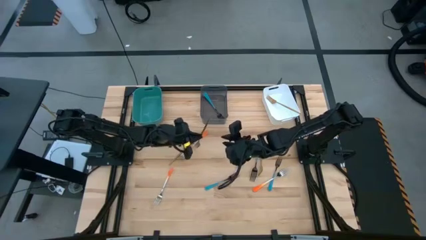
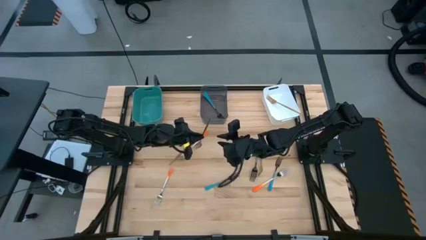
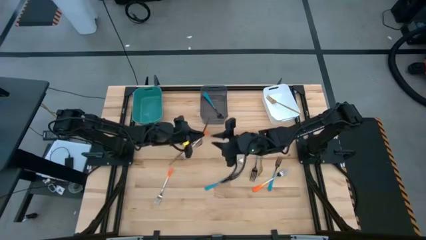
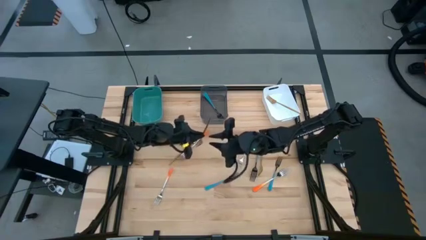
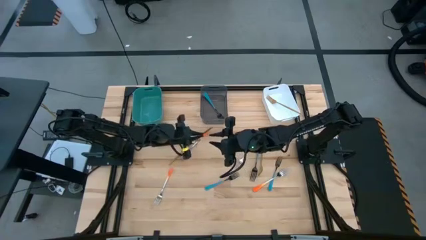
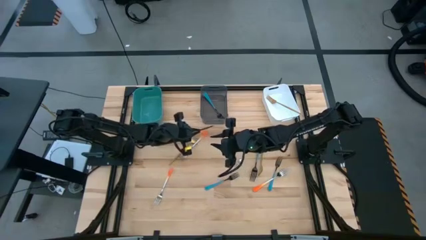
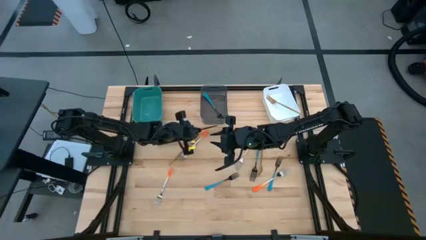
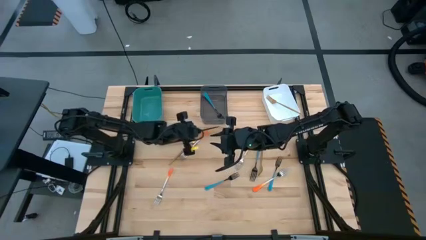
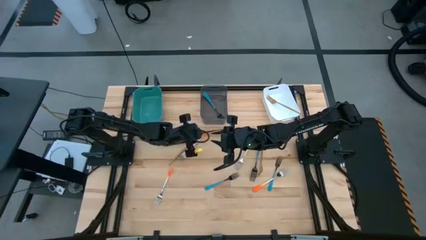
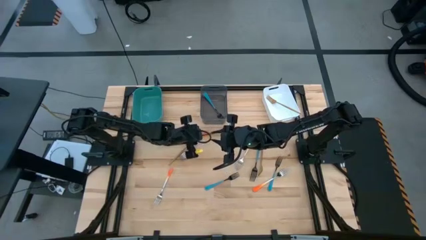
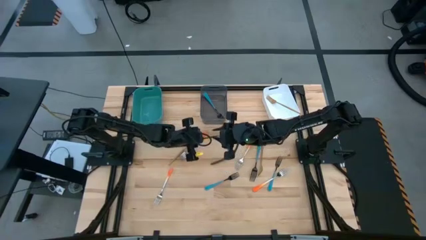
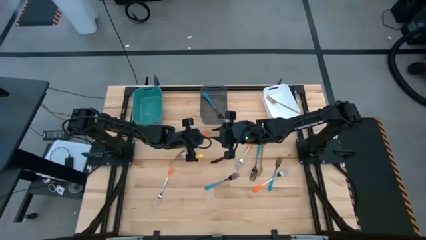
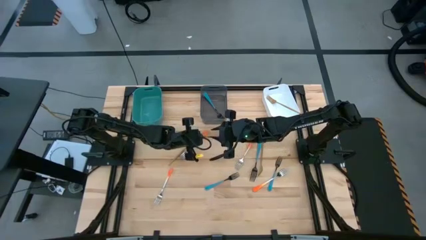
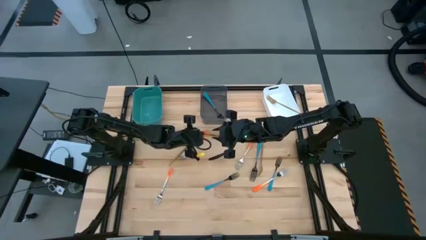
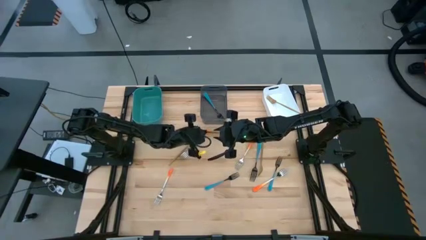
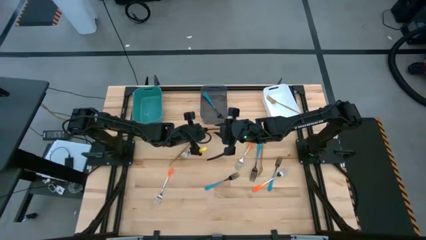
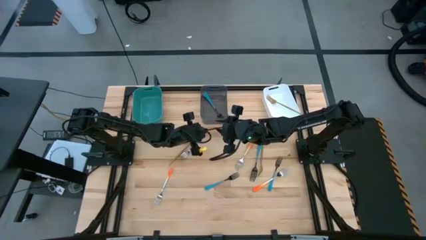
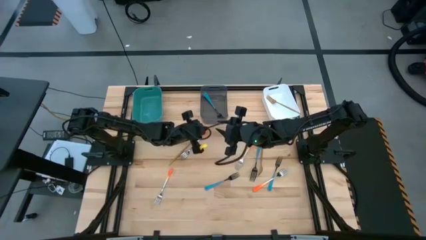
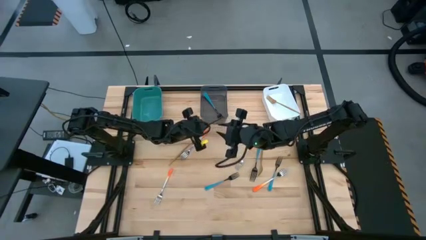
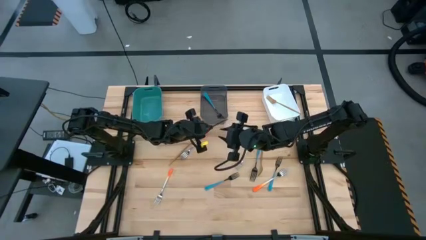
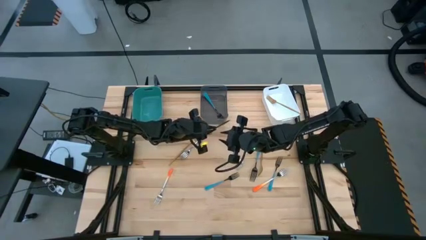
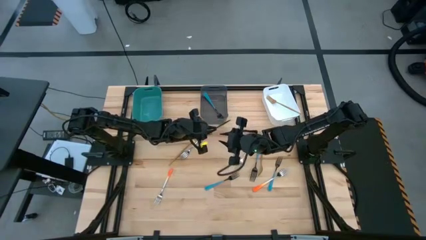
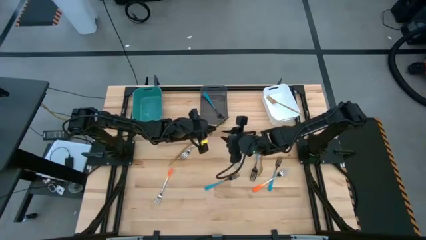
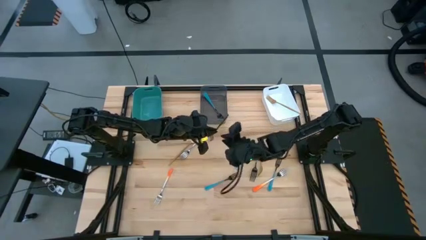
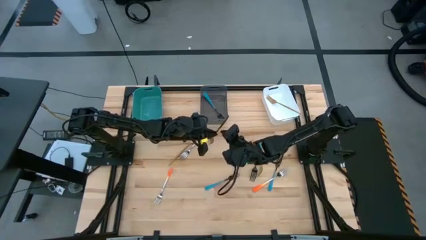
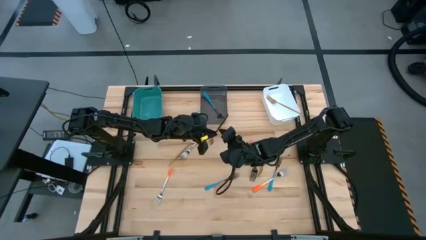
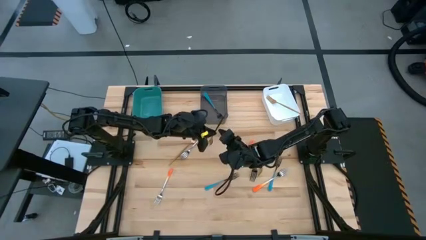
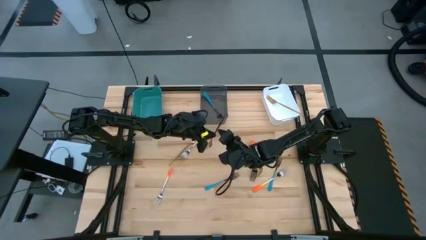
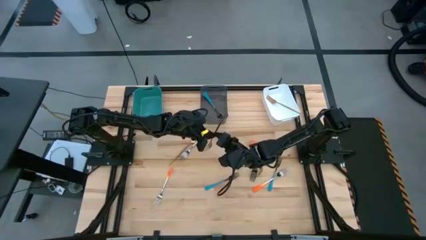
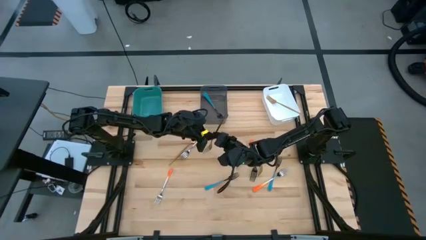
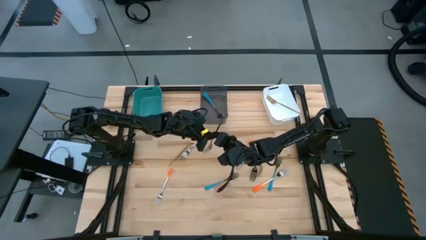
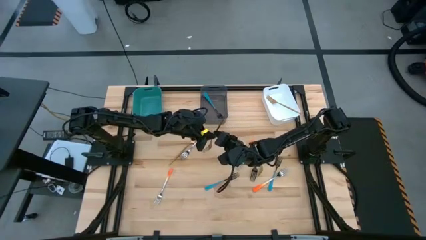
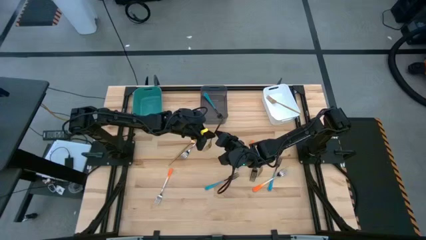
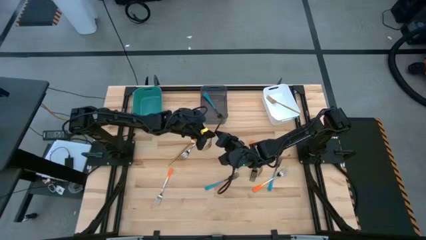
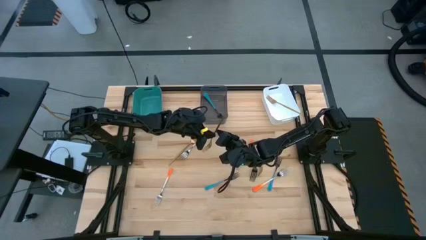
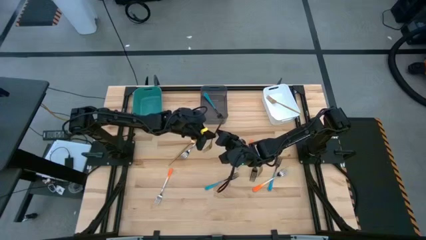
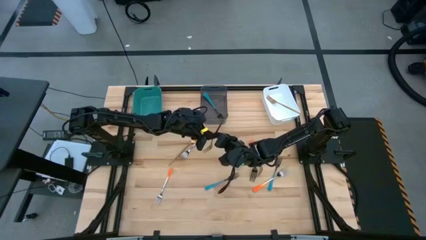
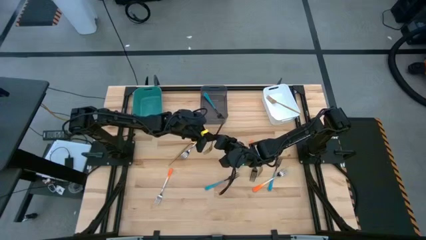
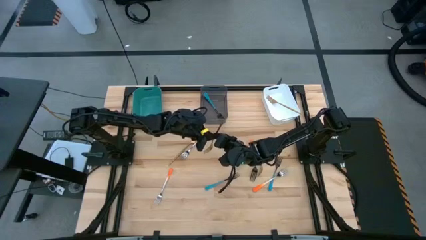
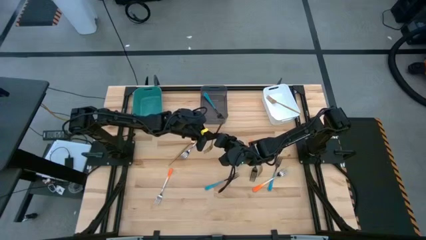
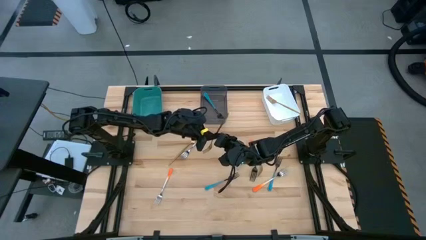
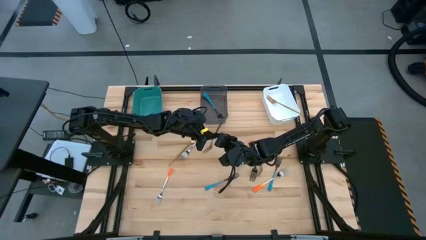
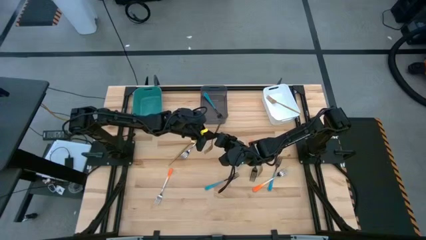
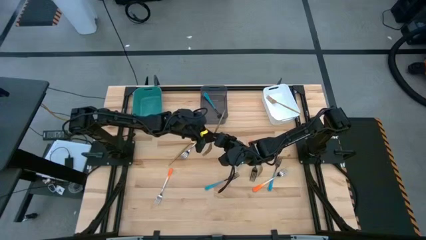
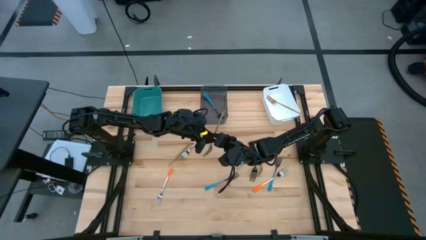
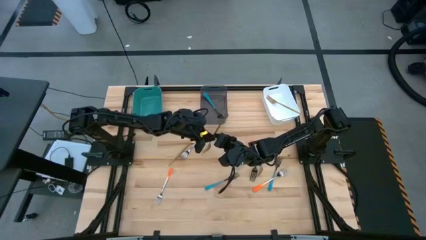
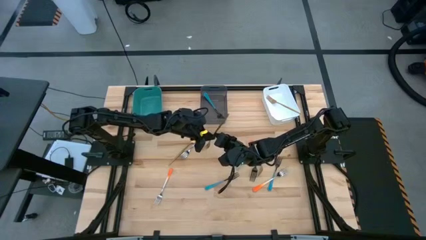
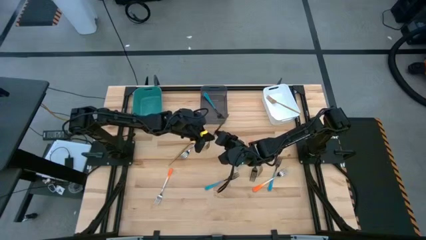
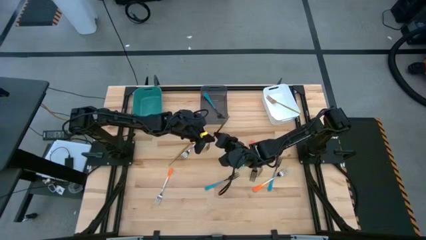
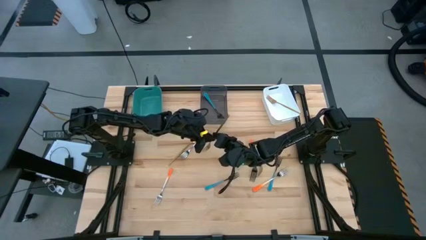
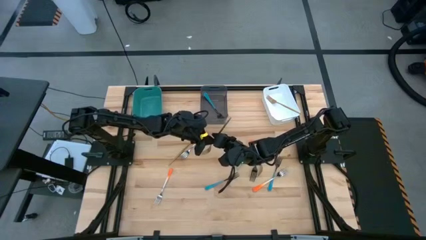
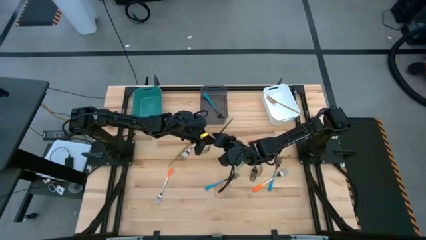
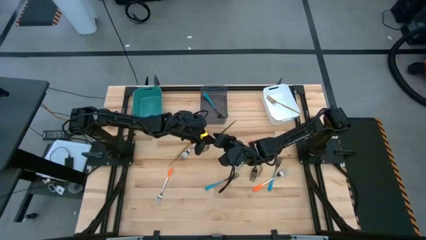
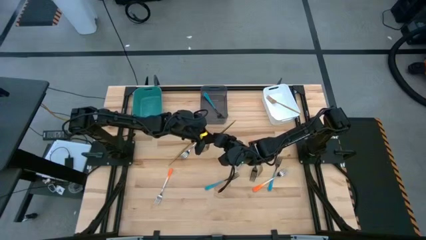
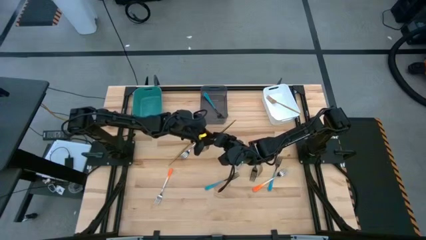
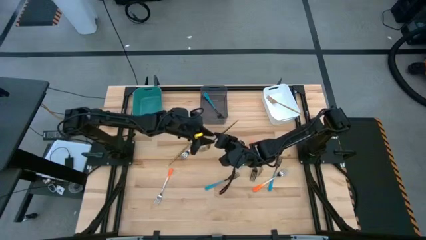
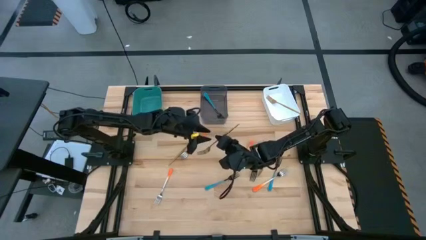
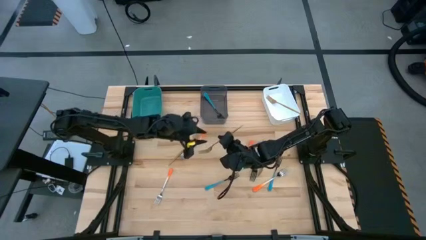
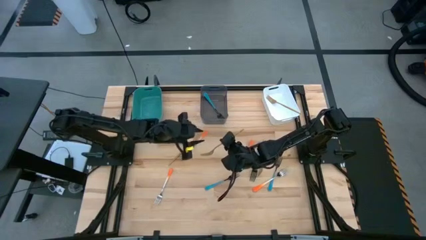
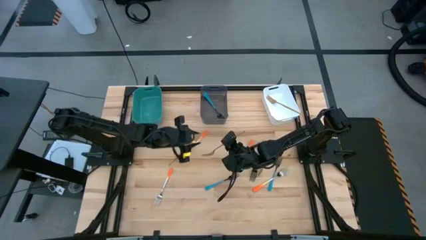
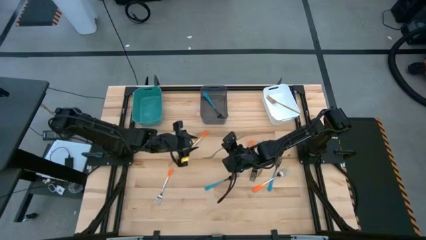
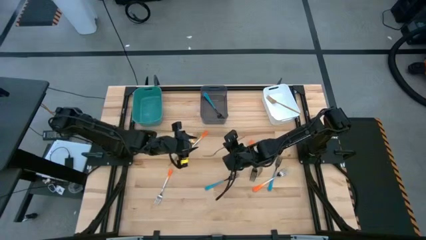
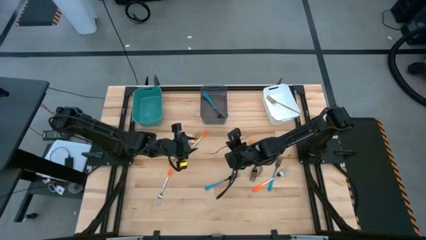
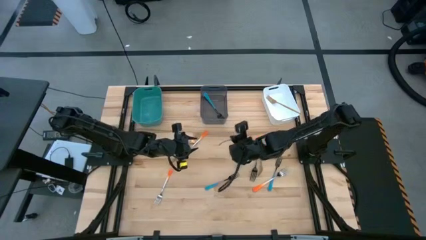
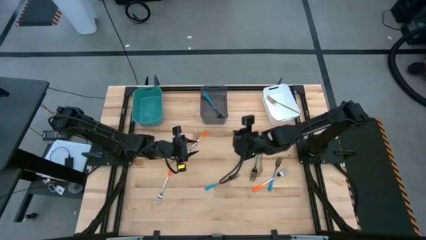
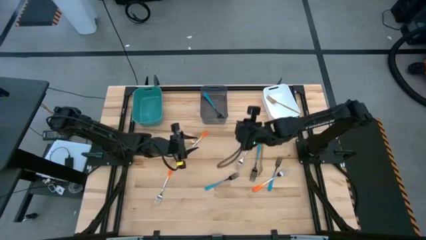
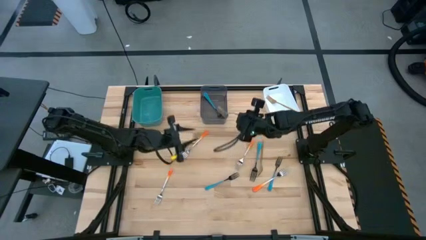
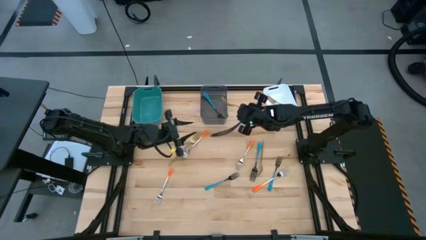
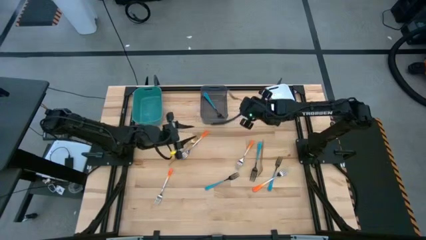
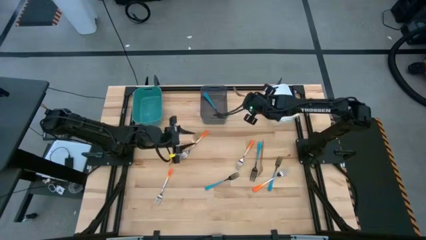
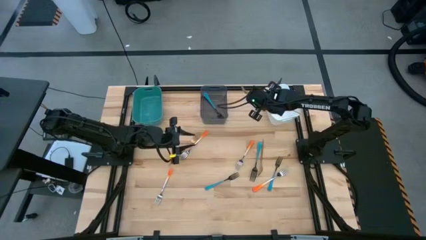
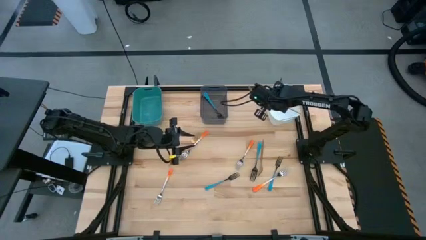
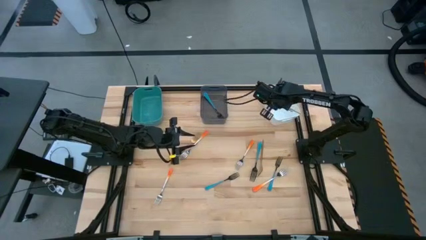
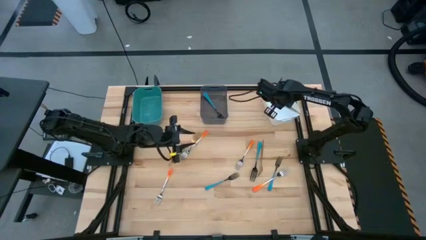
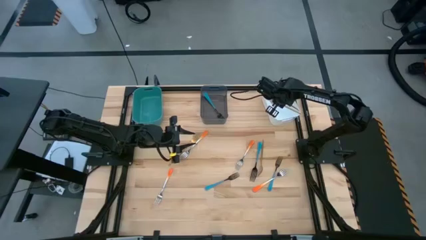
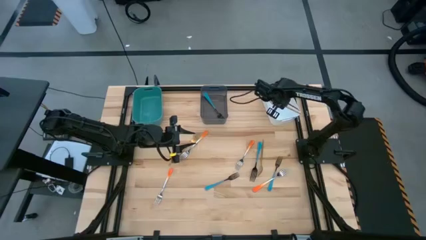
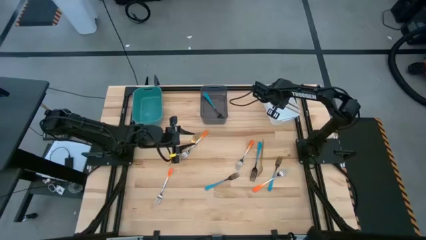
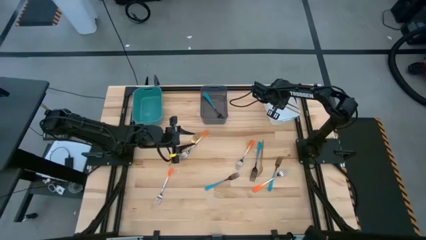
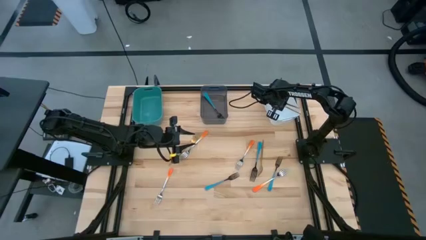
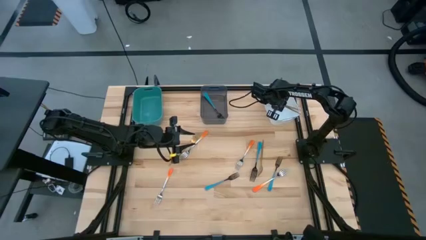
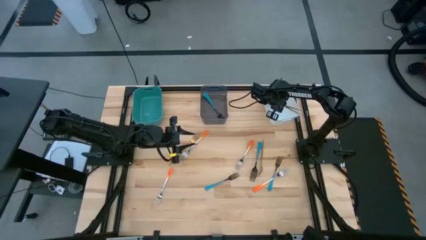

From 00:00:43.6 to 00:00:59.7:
Task: Sort silverware by color (type)
Put the bottom left gold fork into the white bin
